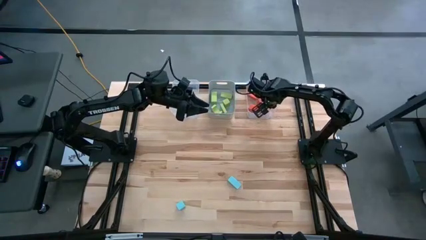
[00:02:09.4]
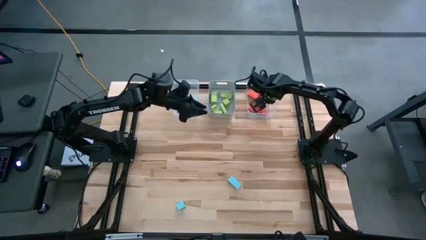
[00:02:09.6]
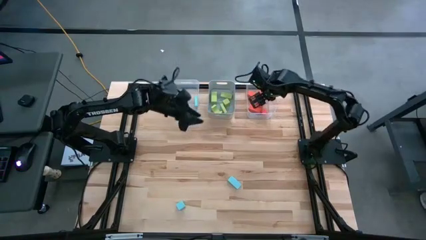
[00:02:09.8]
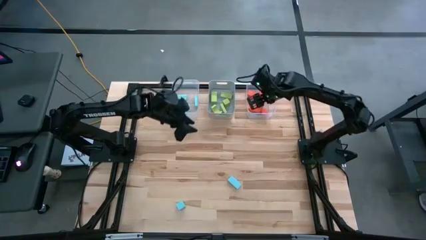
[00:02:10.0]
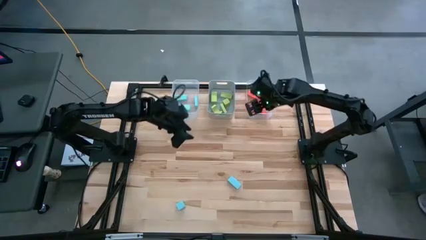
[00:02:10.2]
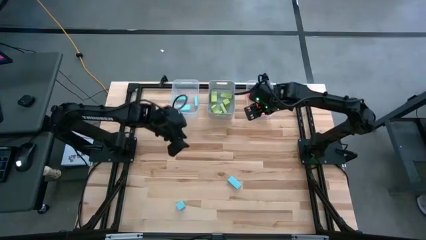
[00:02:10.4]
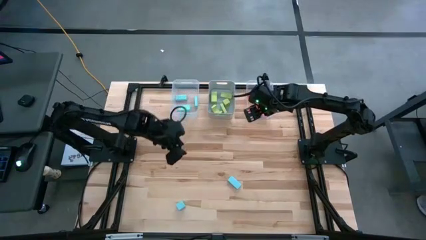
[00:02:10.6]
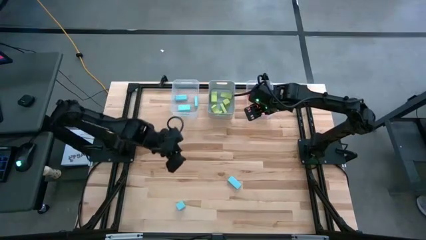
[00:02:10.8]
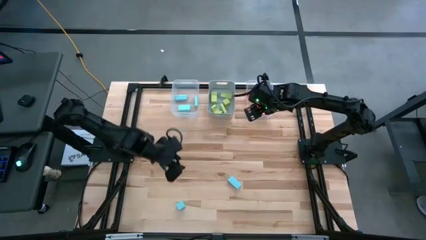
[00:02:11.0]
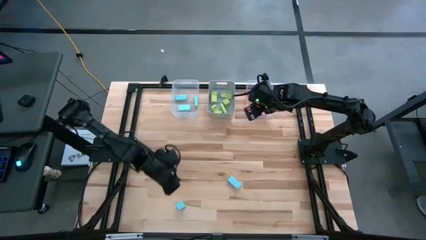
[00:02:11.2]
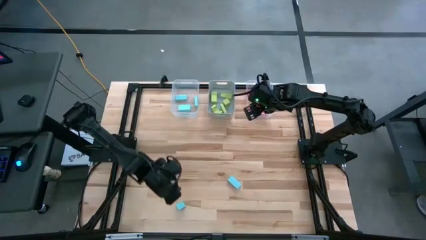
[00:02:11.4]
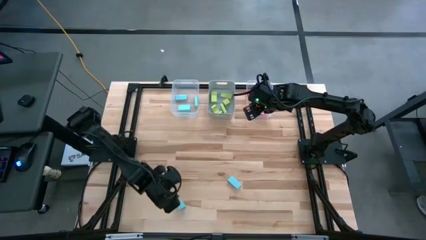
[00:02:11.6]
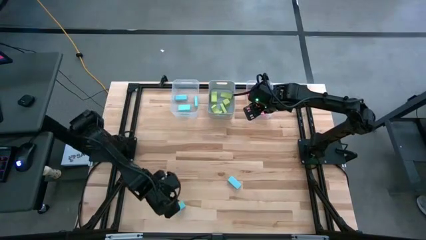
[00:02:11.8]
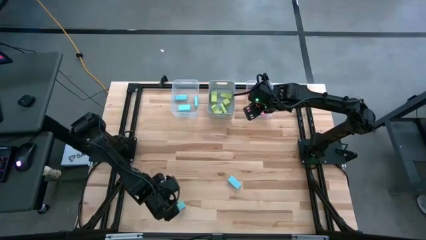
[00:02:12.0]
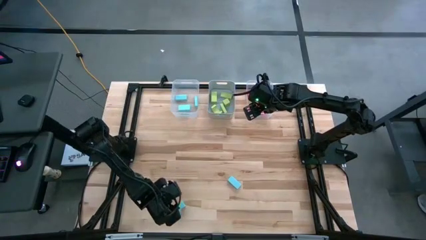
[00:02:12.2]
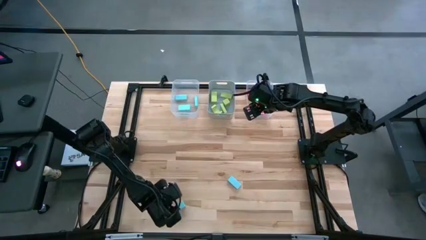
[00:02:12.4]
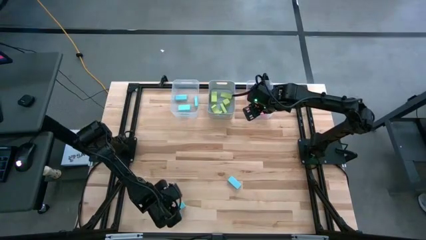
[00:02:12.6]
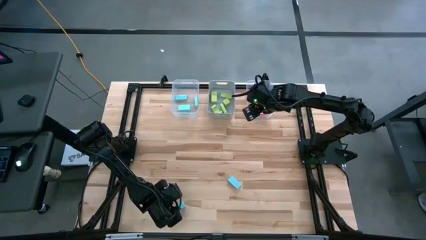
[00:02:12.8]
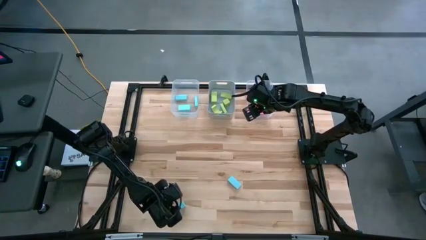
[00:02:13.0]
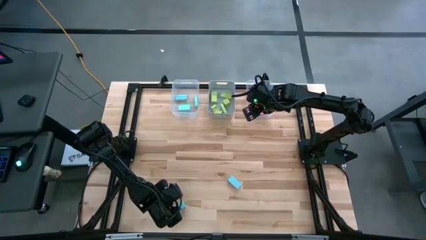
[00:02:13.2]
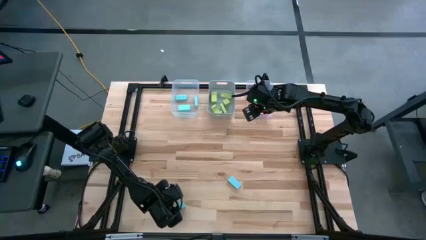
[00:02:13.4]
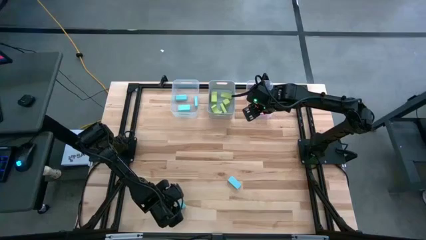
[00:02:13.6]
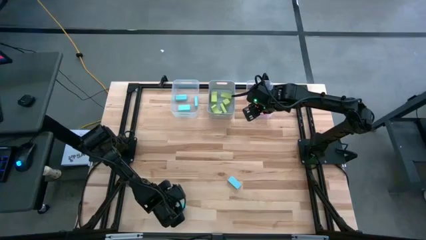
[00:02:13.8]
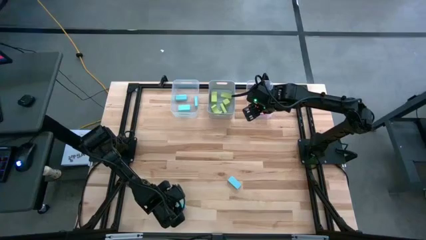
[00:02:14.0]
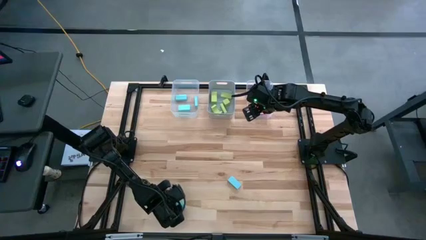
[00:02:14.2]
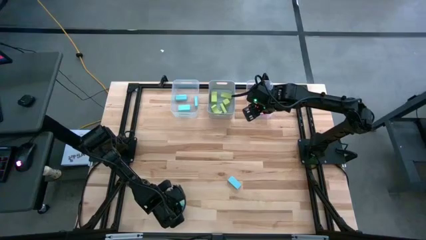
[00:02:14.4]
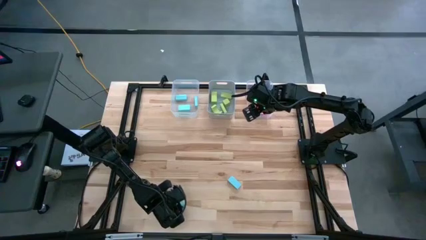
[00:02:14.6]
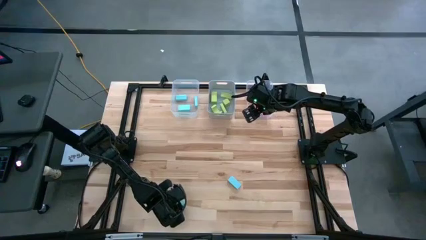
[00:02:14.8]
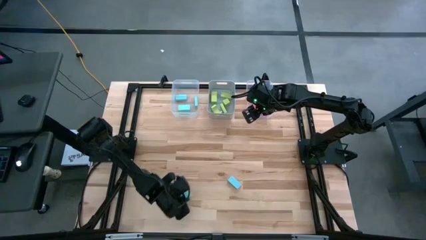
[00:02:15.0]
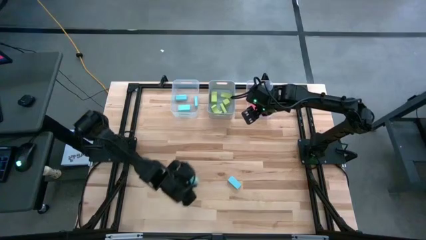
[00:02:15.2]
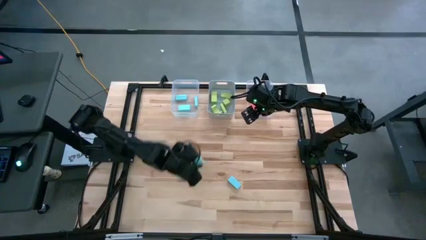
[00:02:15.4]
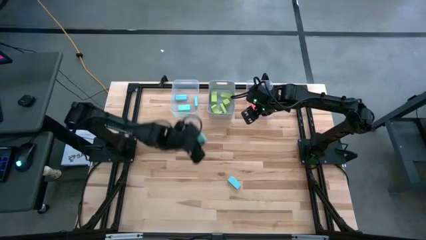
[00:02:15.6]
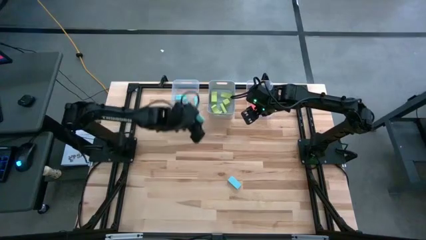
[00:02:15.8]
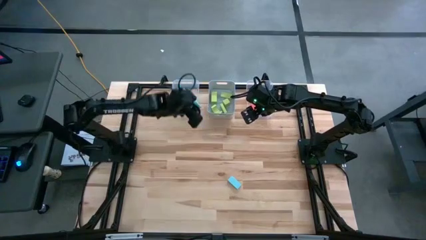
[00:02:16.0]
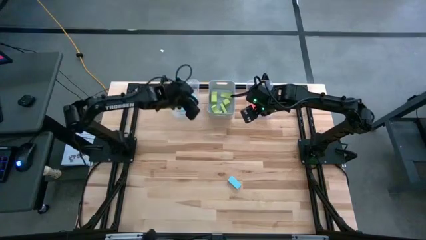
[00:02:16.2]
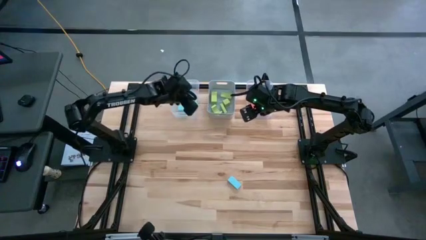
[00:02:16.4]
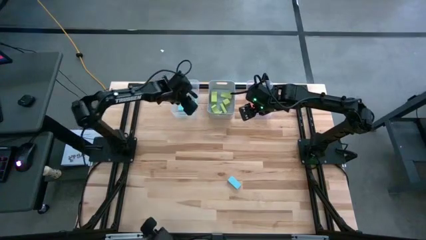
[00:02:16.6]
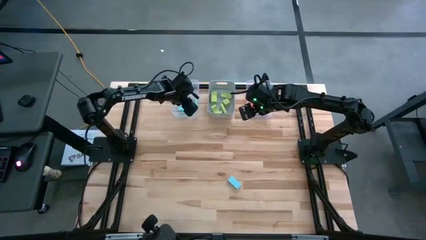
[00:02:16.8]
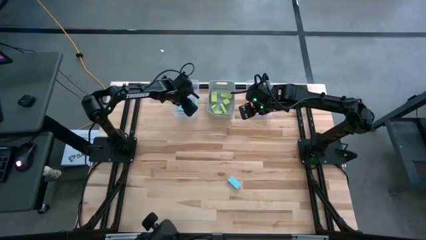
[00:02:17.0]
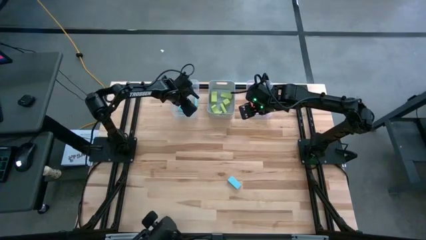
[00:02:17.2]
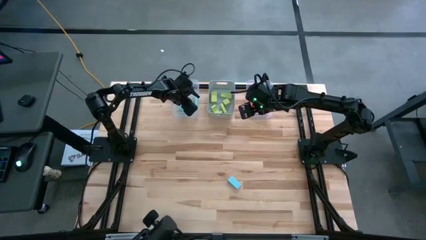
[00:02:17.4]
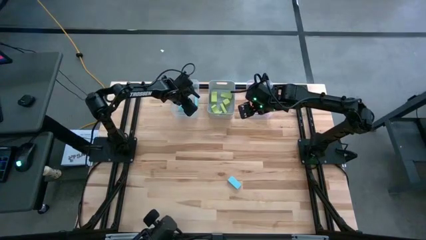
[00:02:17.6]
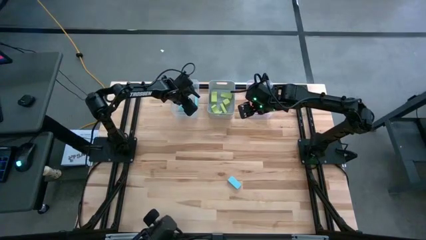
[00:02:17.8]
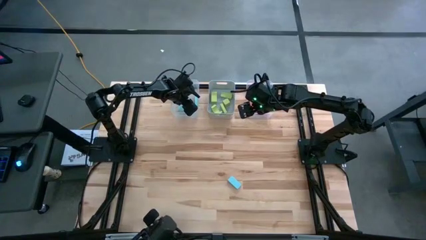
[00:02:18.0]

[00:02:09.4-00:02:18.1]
Task: Sort & place blocks by color
Put the blue block into the left transparent bin

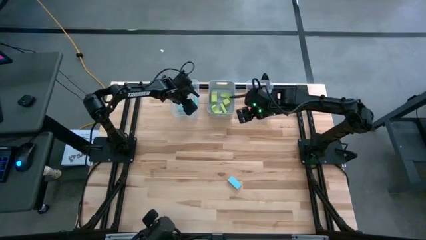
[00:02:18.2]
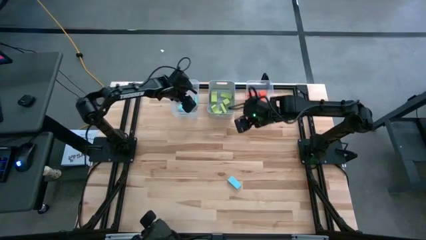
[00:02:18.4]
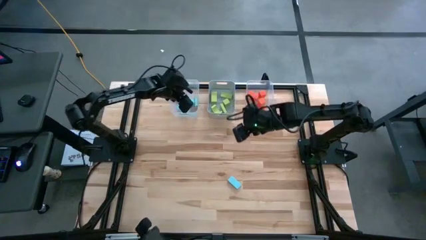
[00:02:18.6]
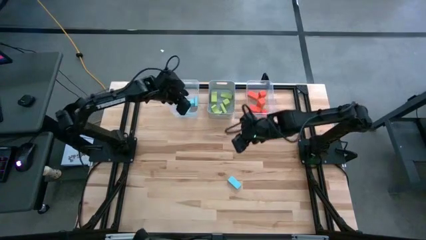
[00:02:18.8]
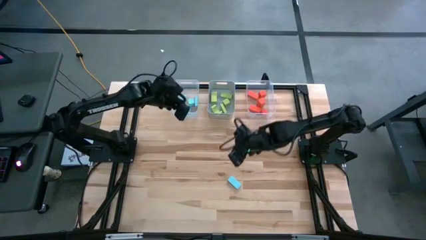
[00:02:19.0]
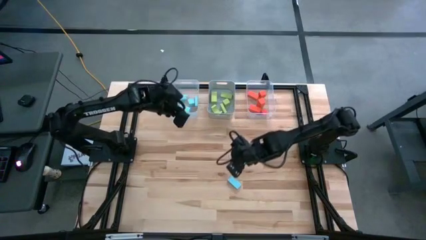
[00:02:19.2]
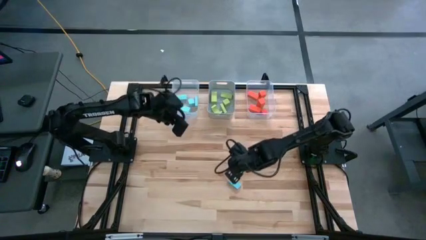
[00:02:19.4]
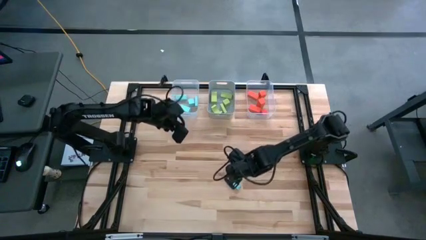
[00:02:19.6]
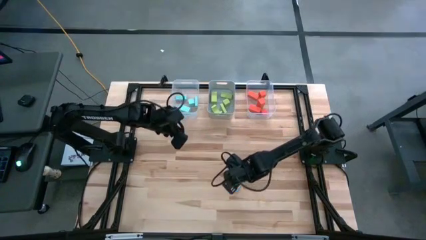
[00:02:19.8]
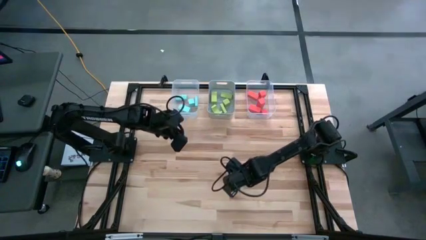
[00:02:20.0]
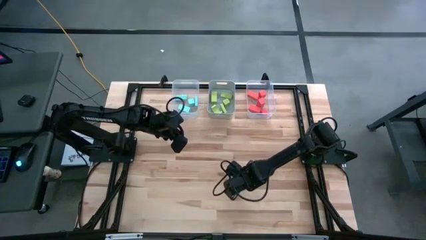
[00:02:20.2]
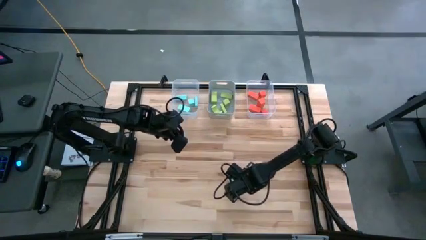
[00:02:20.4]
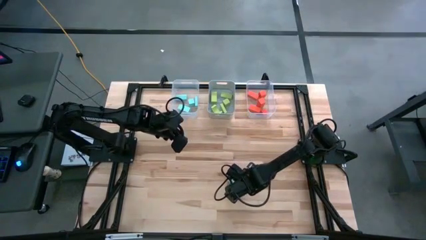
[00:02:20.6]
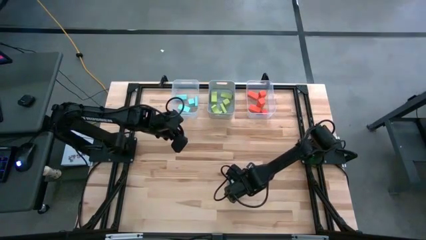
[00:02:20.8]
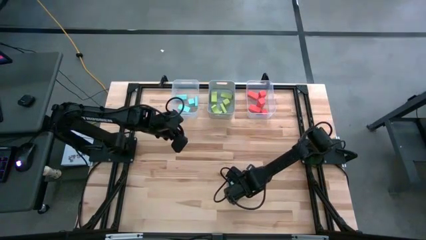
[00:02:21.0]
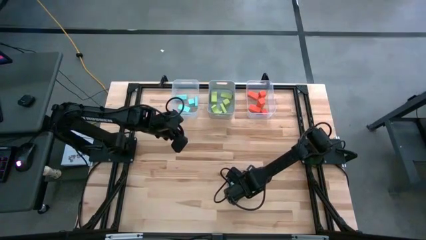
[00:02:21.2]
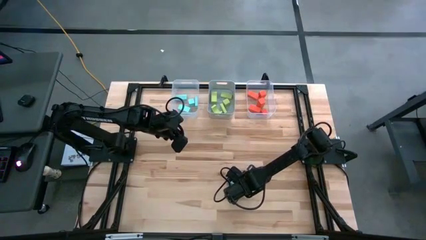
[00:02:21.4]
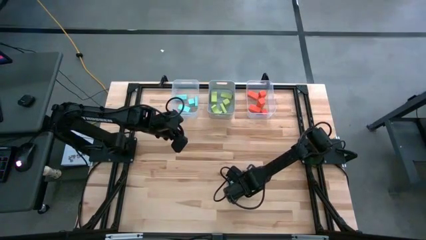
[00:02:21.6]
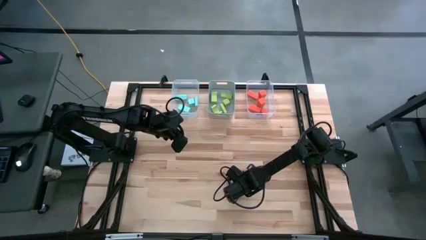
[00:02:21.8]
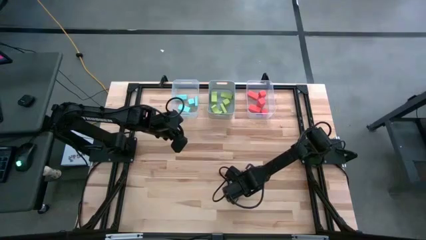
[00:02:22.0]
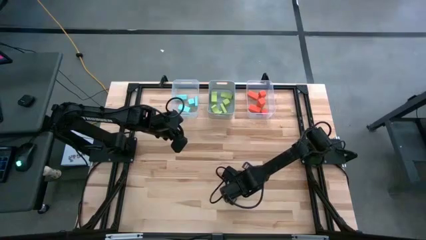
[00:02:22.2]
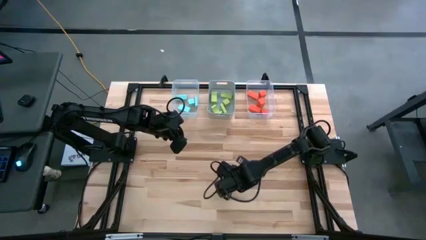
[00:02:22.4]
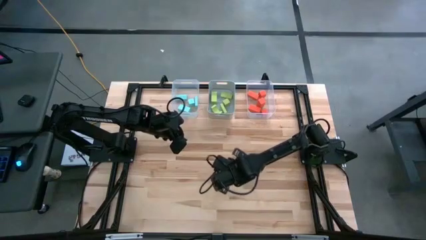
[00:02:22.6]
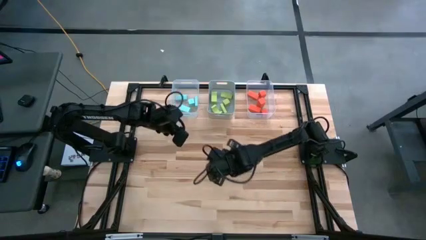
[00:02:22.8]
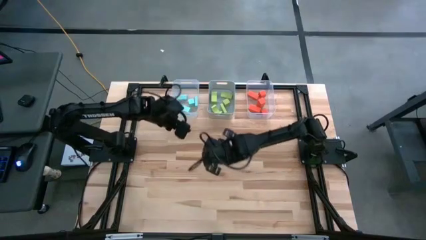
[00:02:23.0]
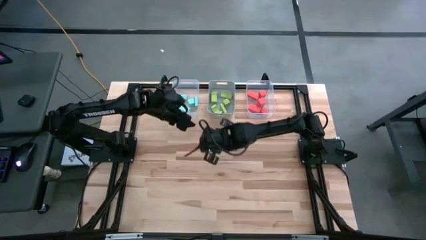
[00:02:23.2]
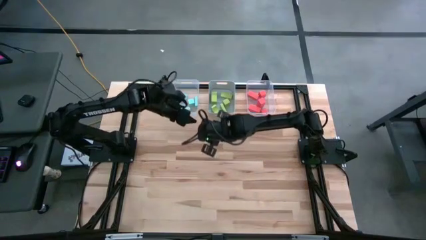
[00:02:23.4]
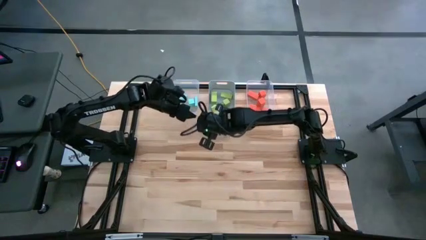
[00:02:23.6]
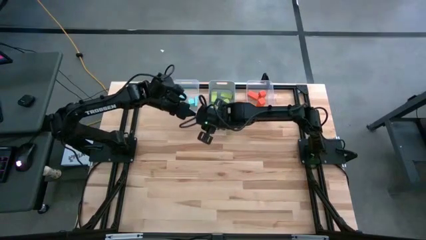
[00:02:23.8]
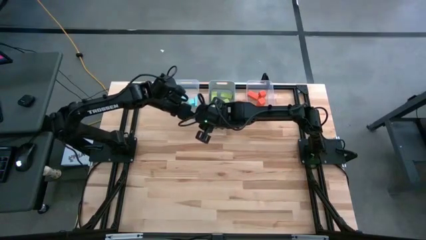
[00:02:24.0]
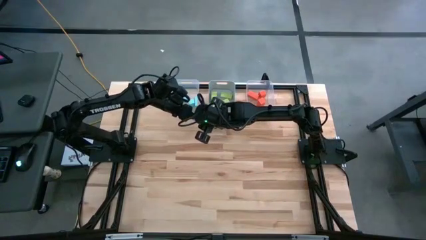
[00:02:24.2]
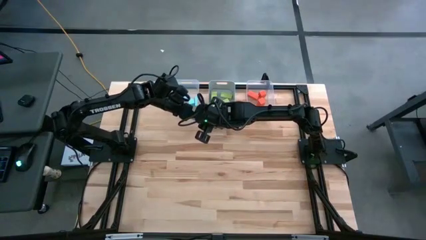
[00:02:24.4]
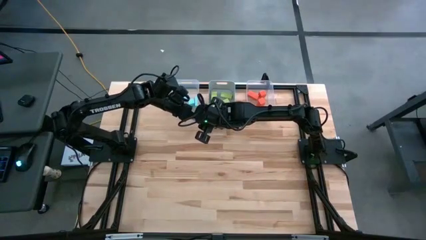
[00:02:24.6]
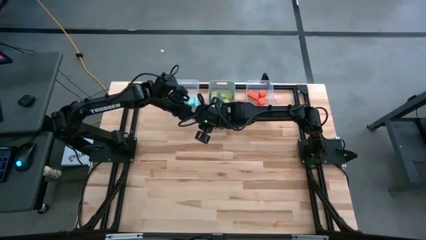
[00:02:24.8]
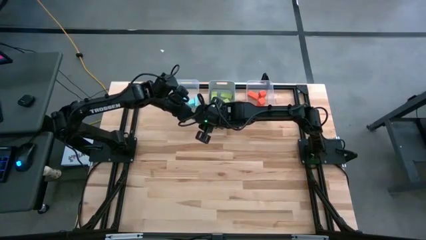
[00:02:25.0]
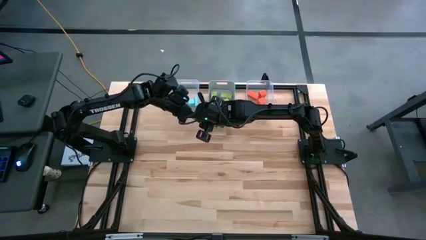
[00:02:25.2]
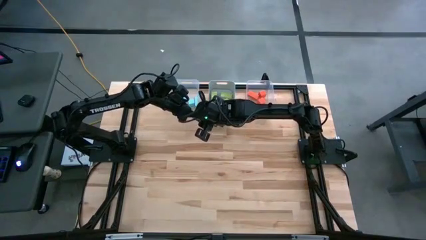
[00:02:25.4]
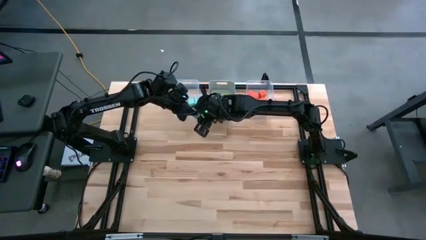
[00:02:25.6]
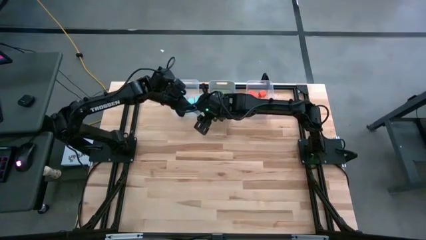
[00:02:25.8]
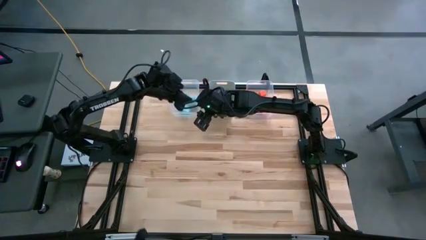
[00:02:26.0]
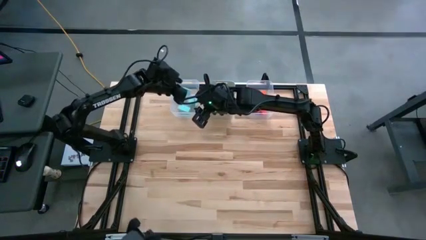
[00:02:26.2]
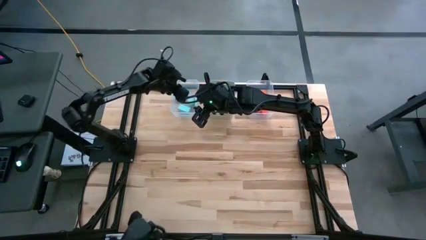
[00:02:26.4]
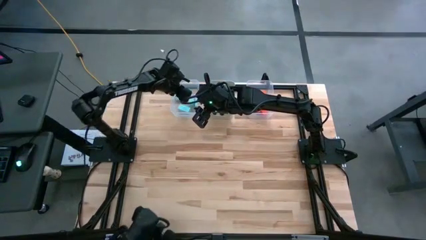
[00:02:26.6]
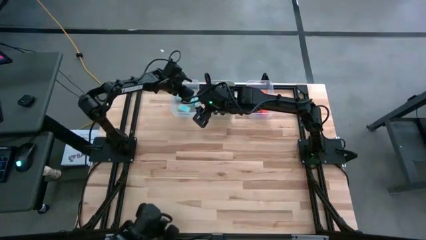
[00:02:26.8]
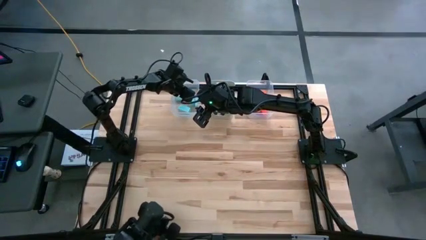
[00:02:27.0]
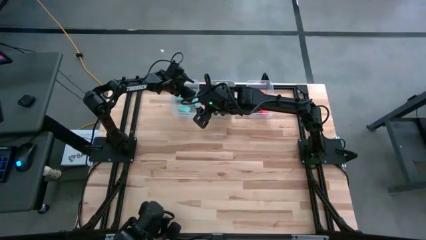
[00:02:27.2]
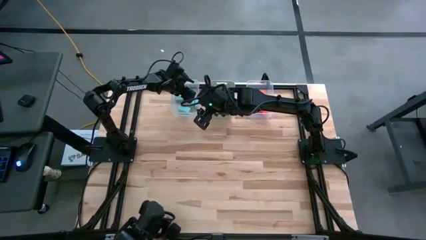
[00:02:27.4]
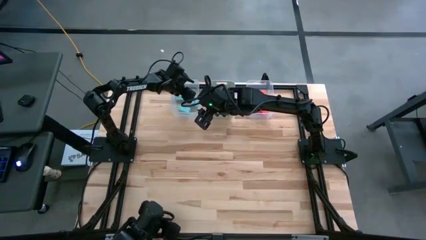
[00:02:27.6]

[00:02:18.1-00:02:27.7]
Put the blue block into the left transparent bin
